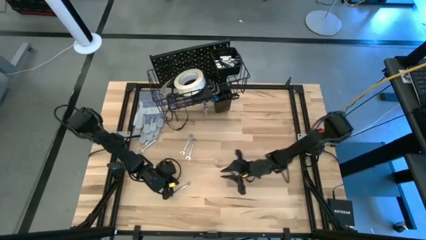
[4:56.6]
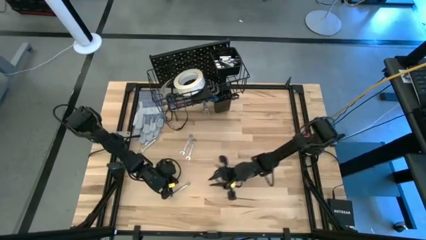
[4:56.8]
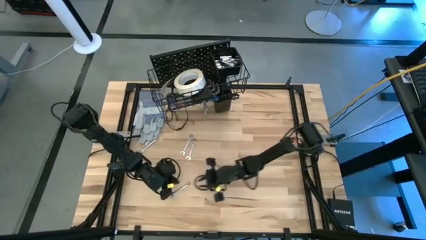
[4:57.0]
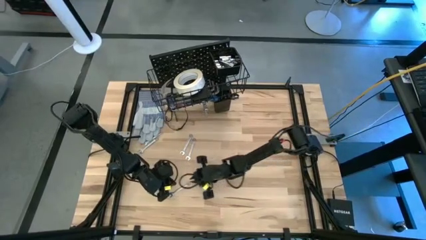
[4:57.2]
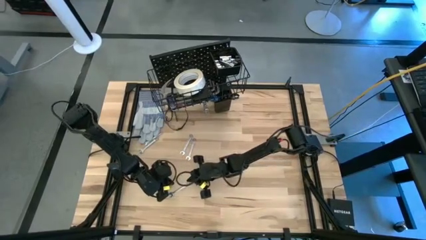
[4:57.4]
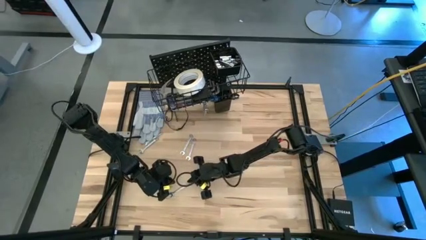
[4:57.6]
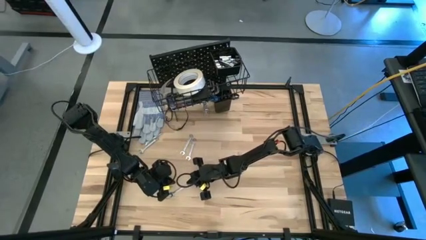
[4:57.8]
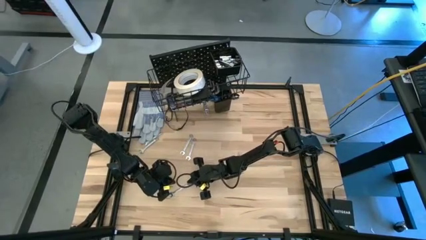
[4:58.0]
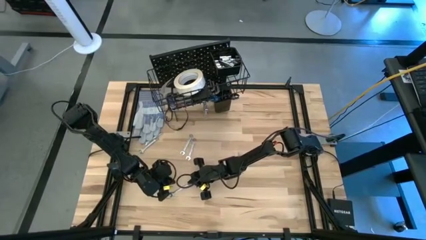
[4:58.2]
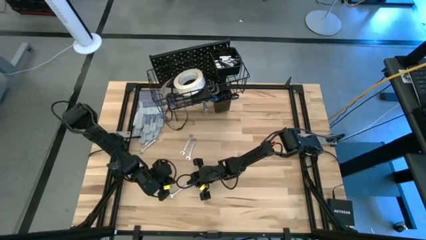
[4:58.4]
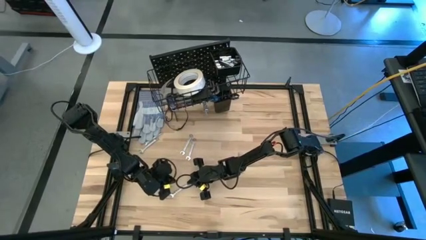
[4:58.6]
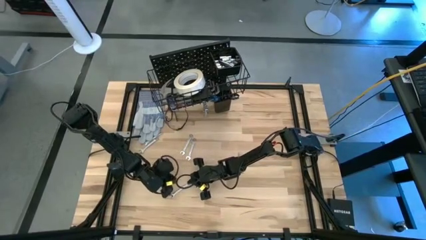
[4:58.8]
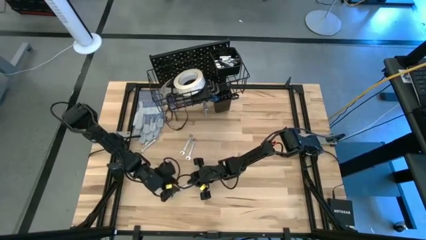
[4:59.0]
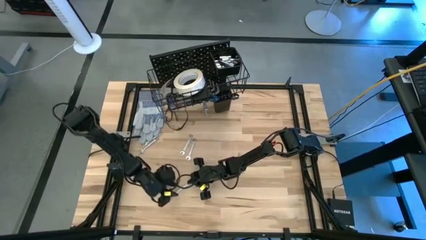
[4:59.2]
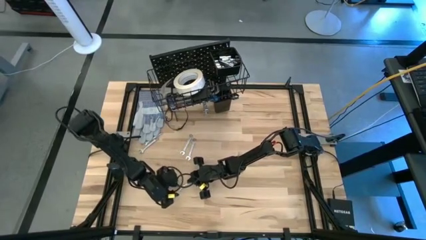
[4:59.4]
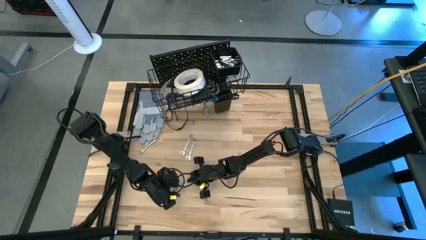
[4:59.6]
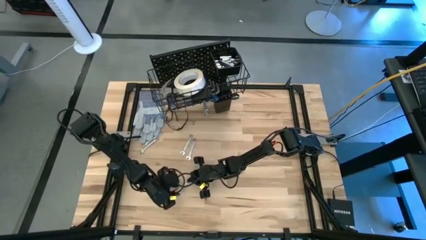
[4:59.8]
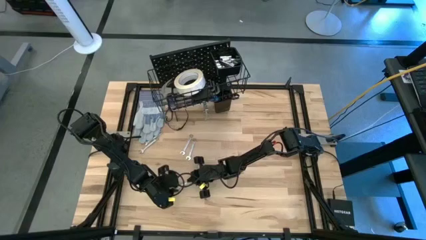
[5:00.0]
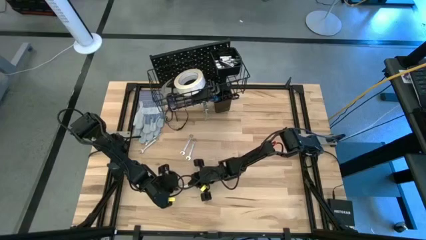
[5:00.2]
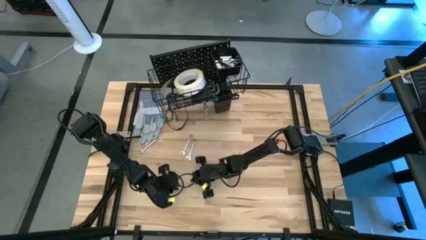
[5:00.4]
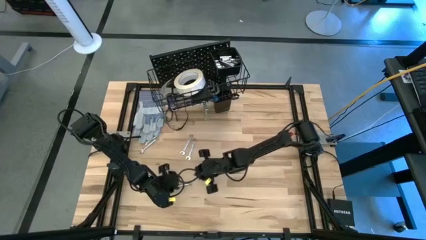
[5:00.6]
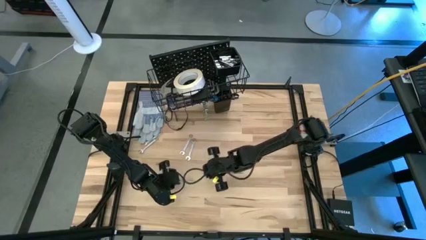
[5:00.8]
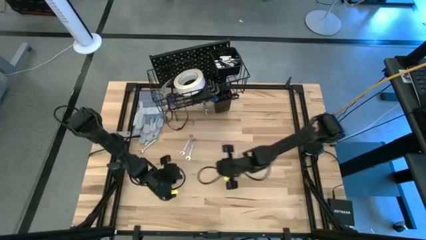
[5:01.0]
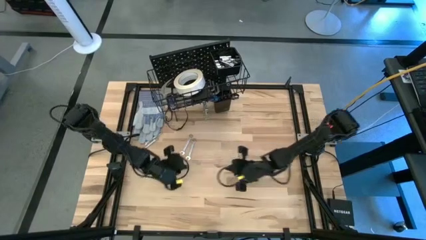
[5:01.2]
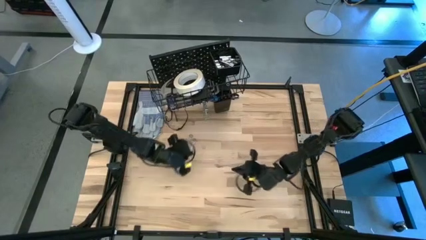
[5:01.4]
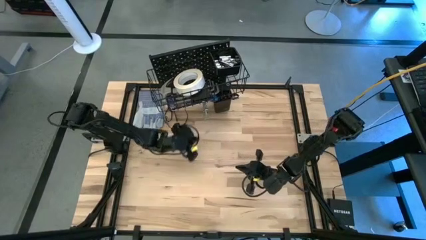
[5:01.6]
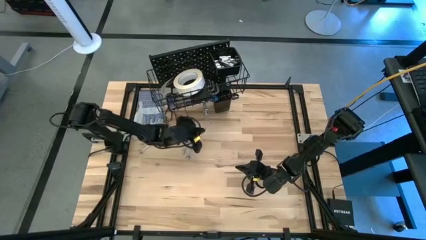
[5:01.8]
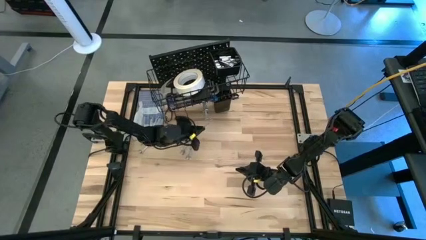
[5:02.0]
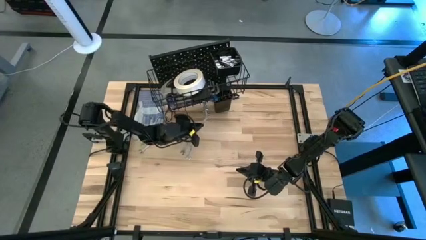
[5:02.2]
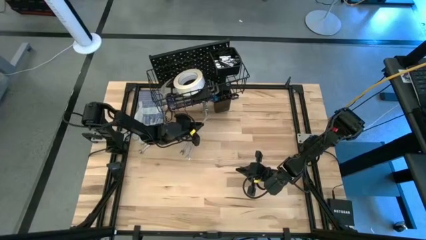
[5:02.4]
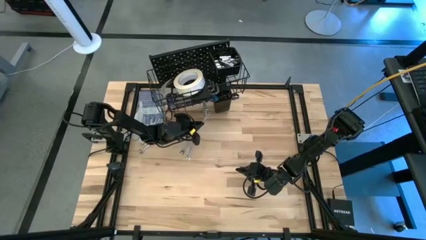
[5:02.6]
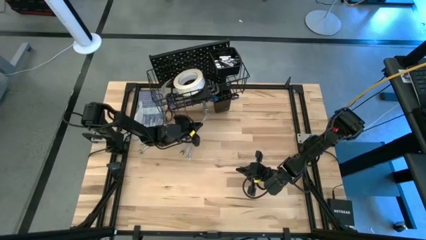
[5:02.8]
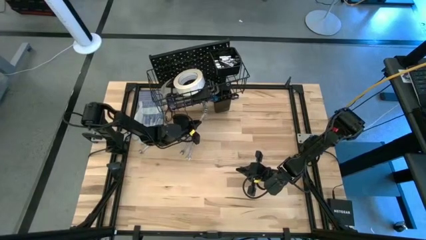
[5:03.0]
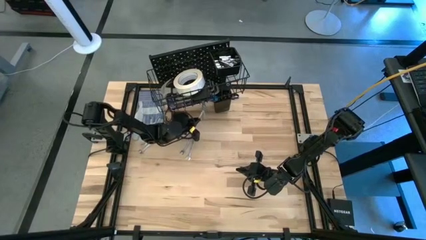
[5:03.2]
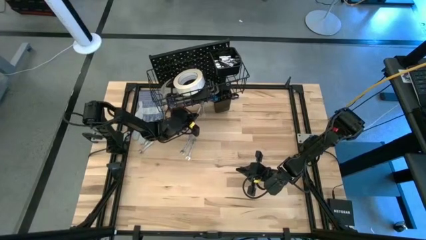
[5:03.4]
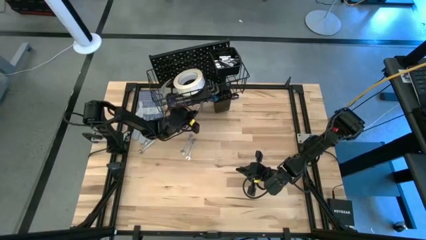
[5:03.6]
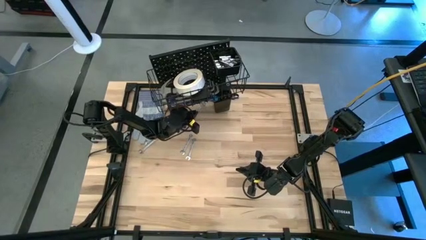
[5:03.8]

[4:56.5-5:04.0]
Task: Hang tools onto peg board
Hang the wrench on the pegboard

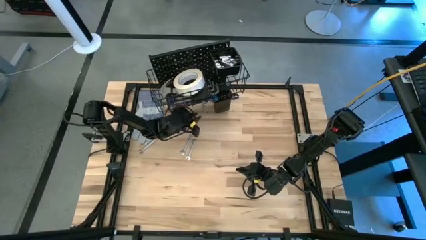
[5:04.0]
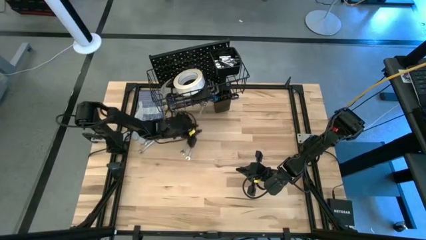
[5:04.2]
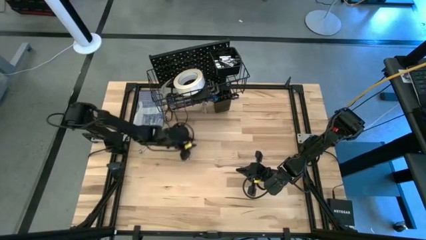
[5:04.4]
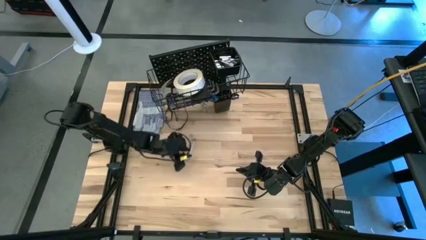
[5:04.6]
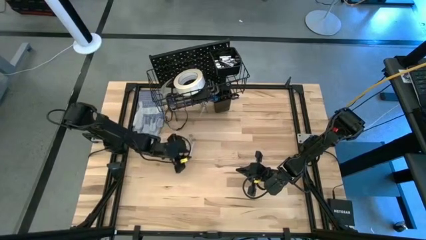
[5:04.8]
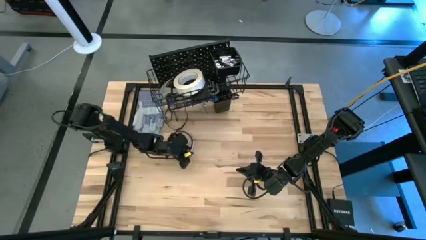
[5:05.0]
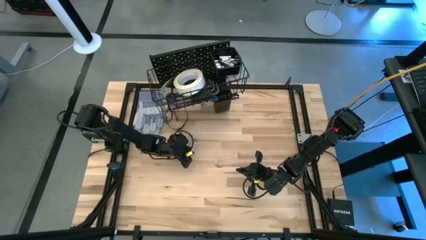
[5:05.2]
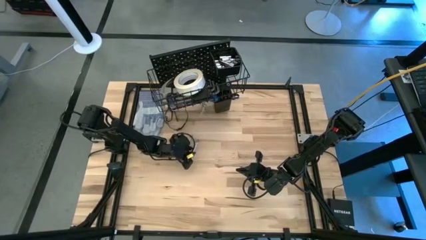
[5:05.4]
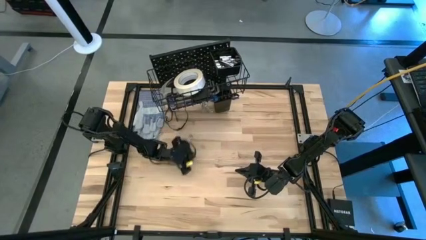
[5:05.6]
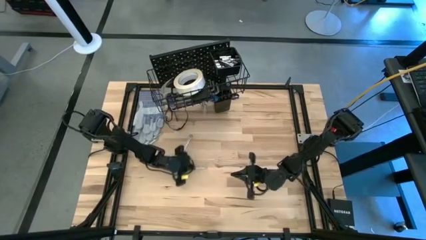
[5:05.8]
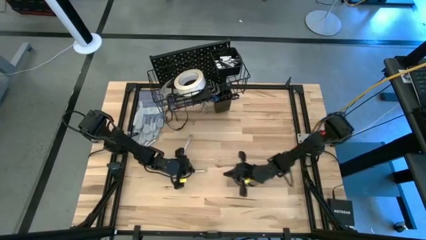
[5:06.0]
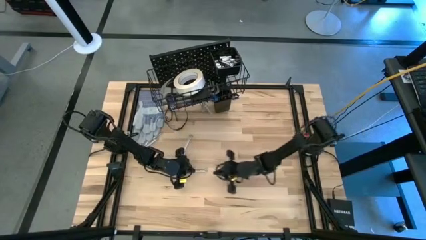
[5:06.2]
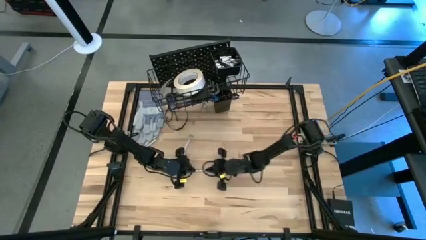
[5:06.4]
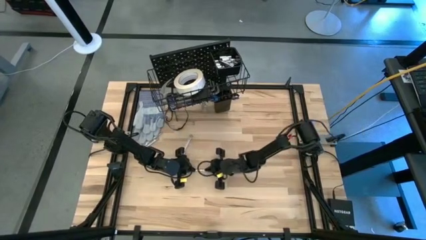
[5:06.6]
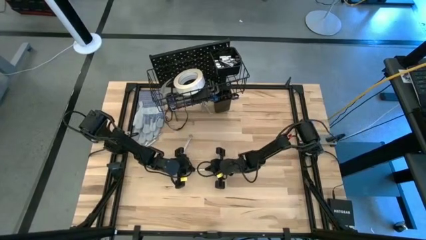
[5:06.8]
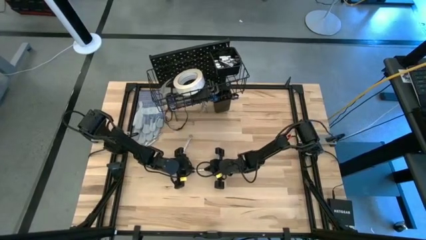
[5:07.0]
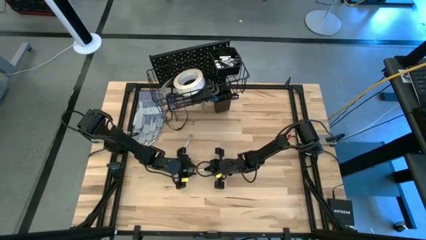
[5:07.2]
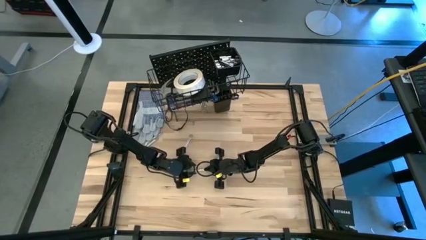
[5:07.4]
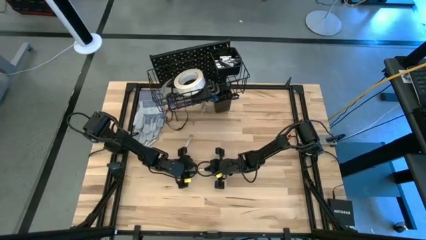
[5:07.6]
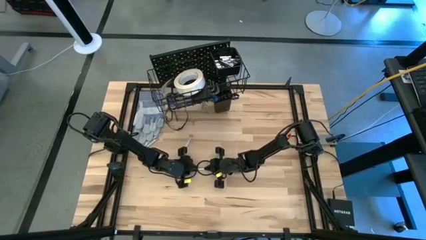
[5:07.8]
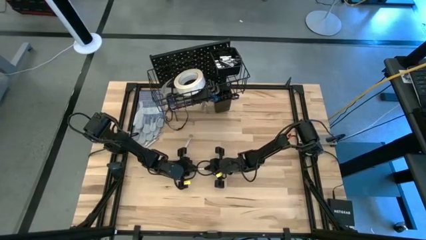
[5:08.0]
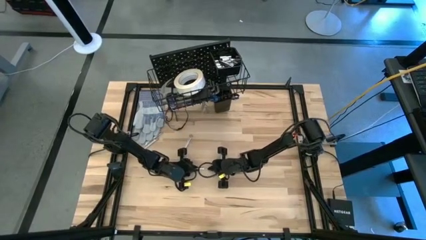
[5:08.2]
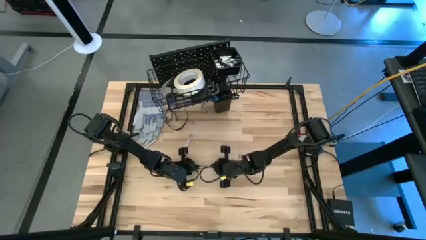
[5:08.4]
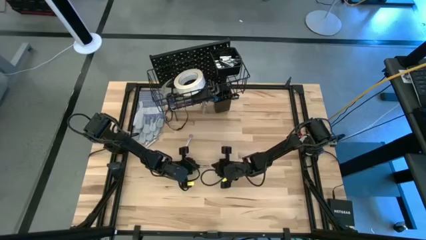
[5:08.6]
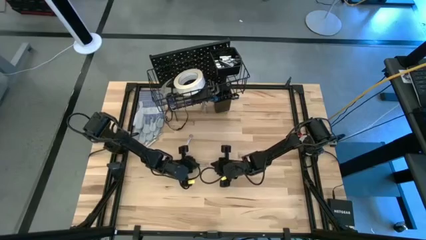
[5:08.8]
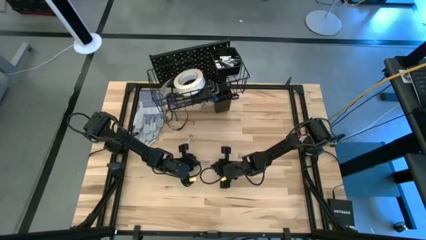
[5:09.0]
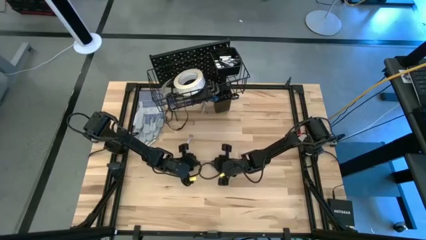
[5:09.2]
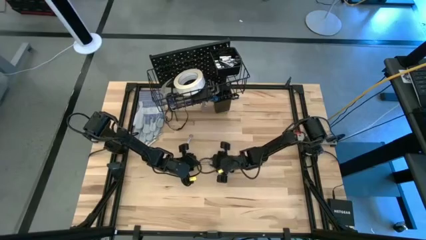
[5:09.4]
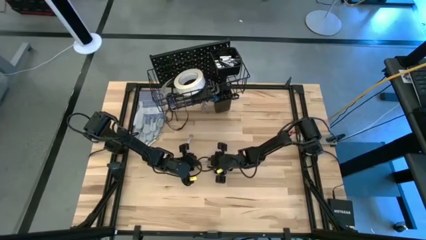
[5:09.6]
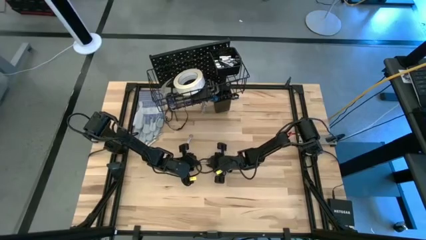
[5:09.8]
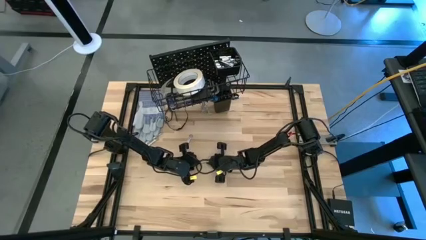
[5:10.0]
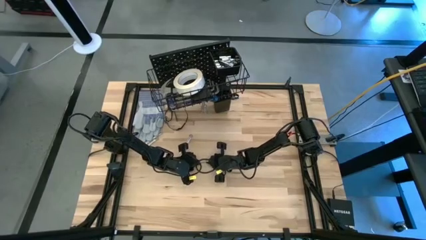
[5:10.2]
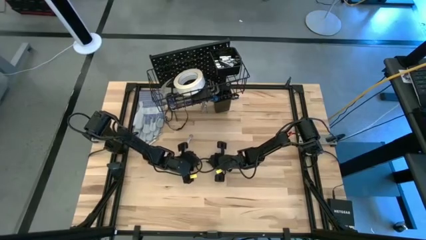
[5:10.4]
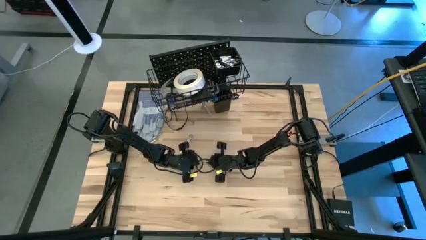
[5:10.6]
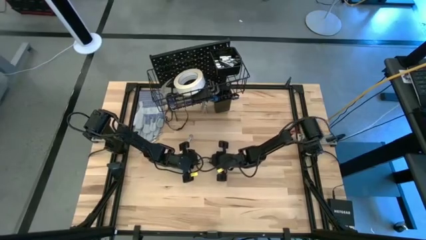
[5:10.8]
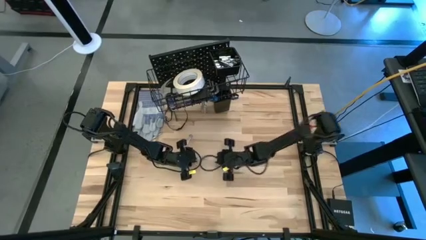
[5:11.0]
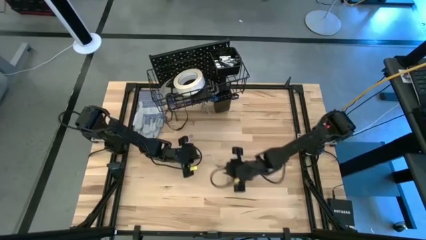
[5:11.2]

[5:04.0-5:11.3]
Hang the wrench on the pegboard

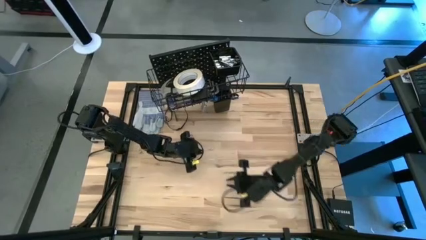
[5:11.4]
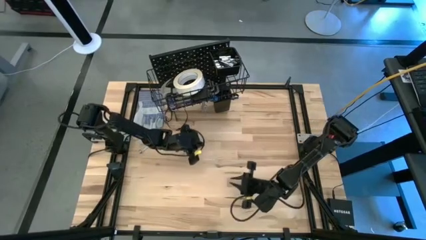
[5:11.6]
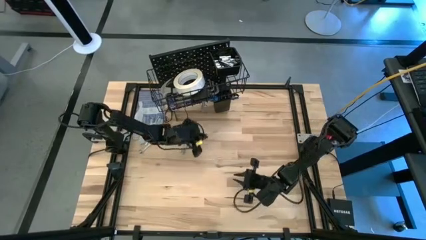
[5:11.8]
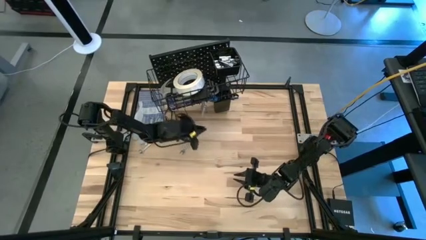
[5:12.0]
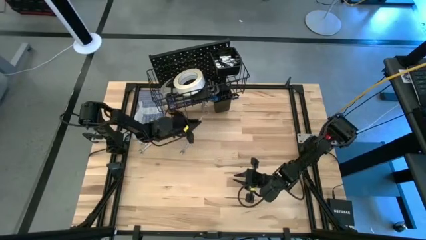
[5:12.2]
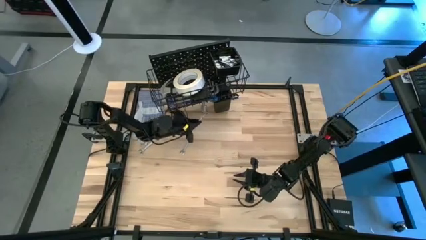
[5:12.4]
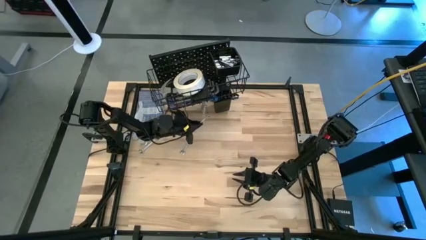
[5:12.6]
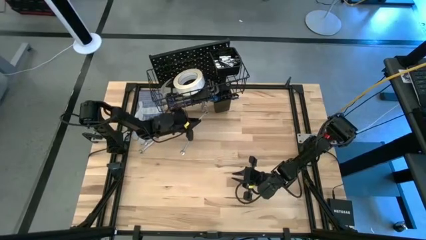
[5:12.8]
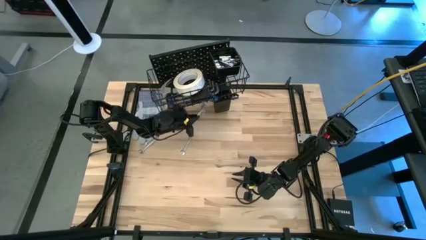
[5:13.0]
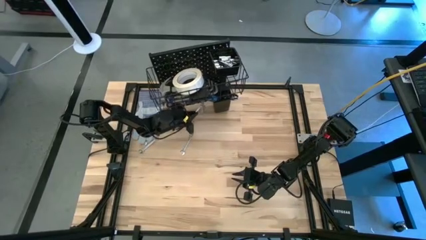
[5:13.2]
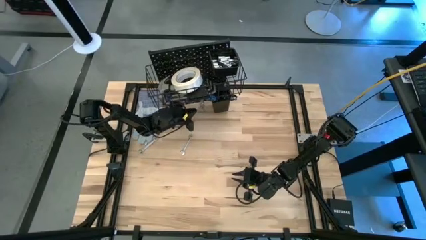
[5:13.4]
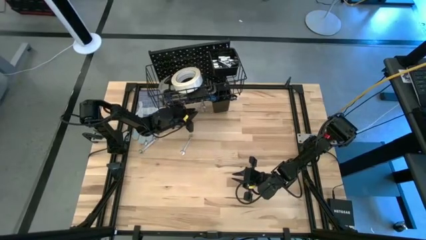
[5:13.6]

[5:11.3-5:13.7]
Hang the wrench on the pegboard
